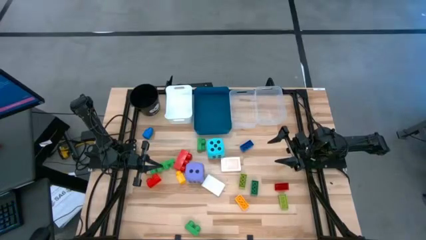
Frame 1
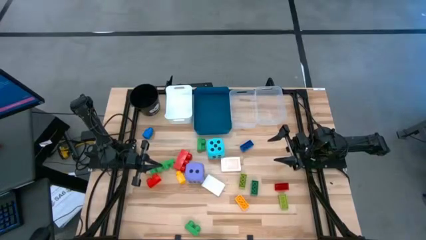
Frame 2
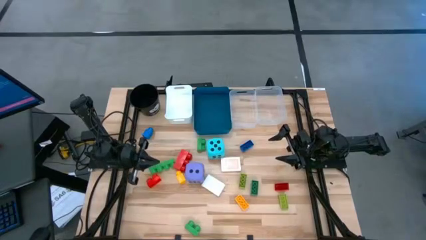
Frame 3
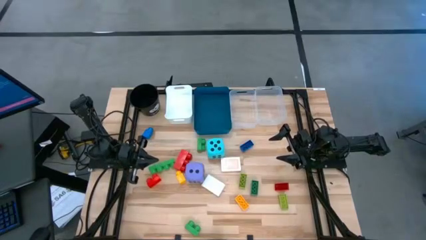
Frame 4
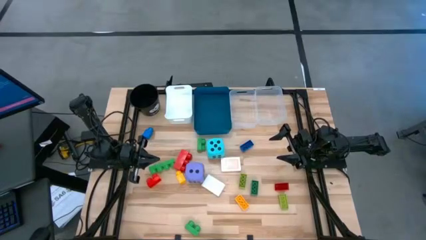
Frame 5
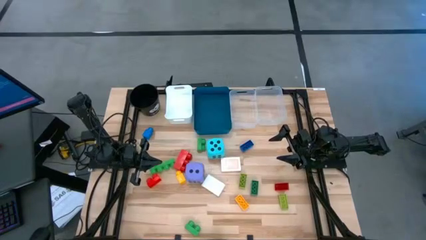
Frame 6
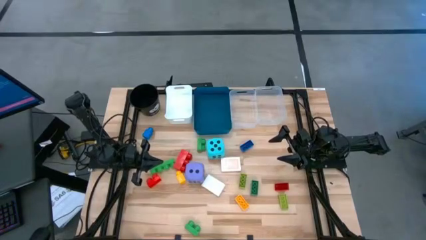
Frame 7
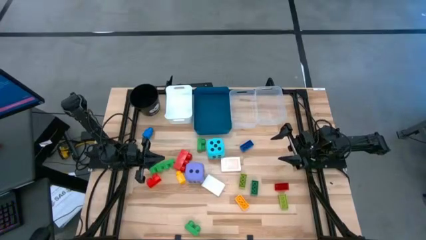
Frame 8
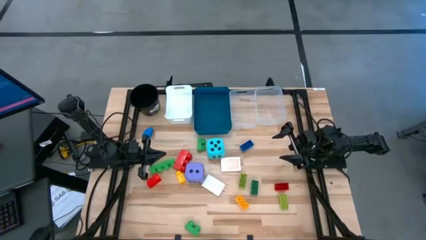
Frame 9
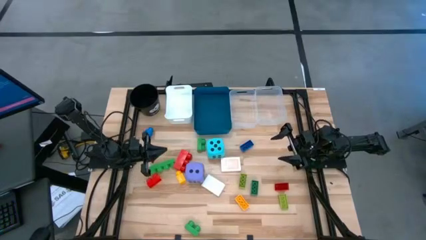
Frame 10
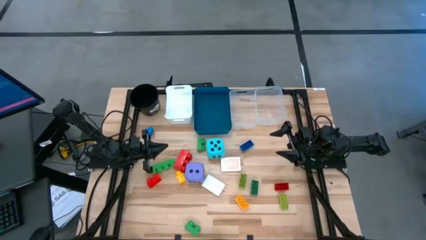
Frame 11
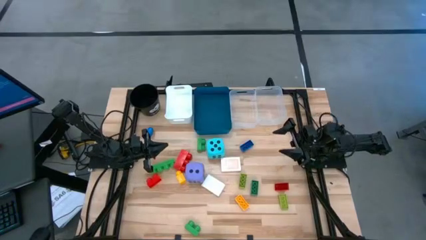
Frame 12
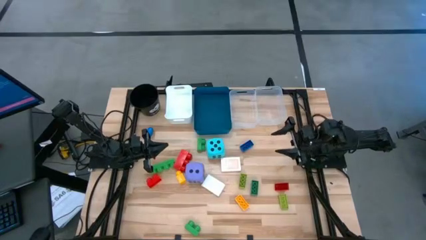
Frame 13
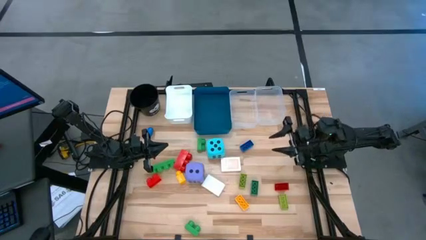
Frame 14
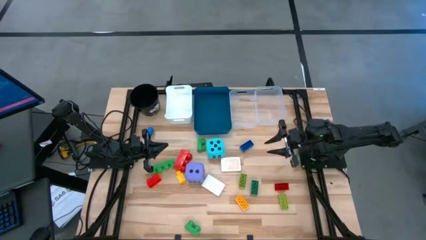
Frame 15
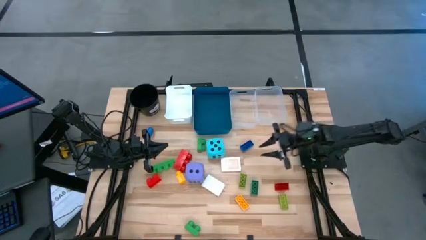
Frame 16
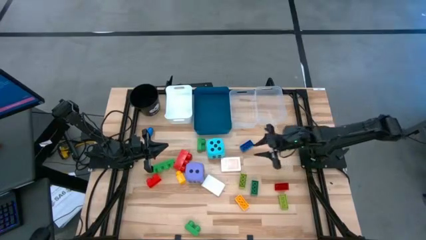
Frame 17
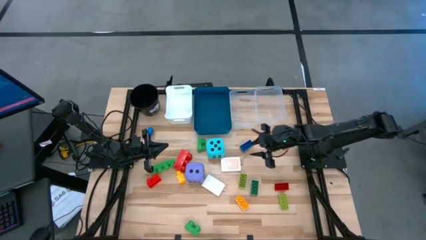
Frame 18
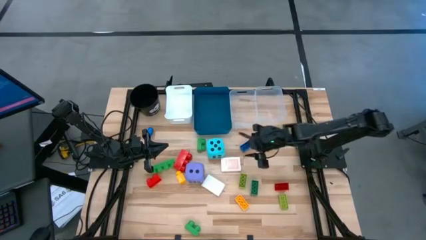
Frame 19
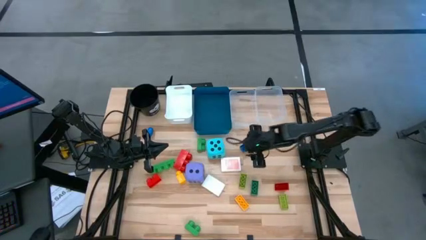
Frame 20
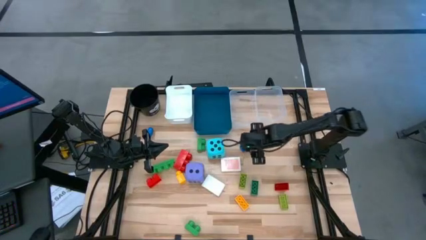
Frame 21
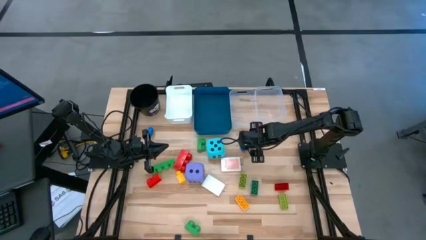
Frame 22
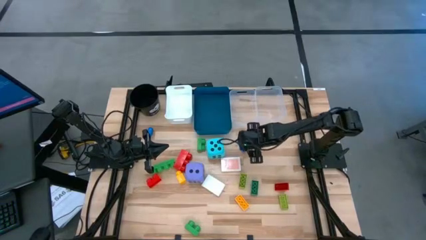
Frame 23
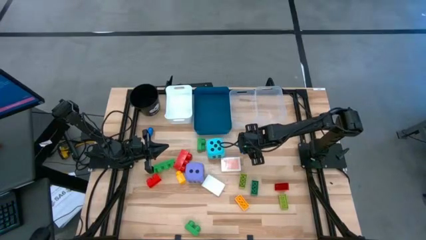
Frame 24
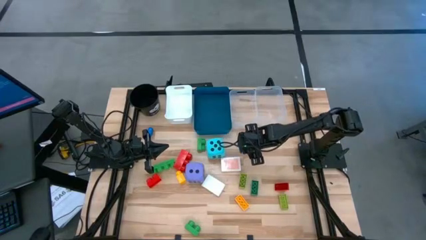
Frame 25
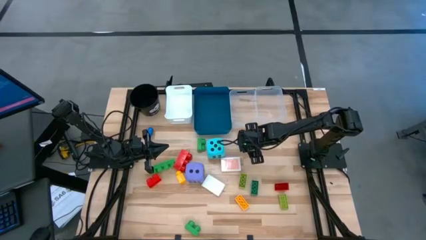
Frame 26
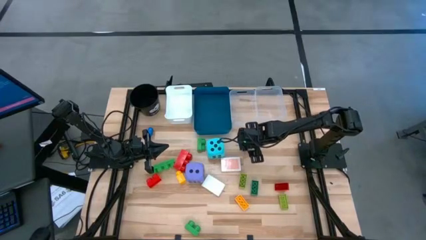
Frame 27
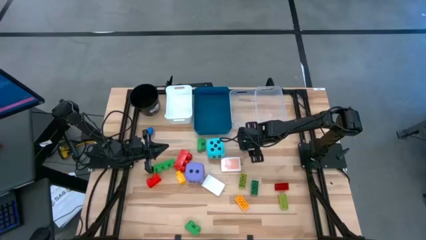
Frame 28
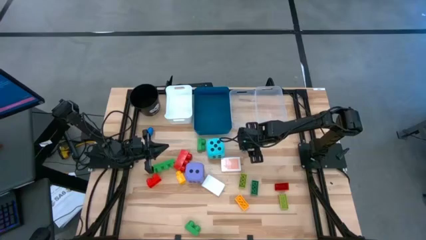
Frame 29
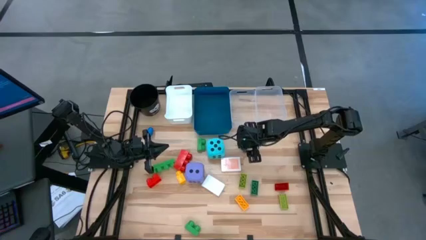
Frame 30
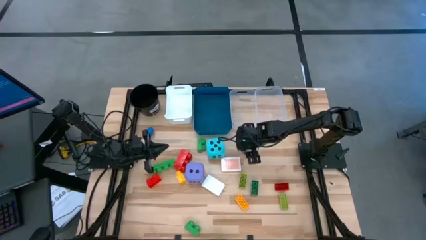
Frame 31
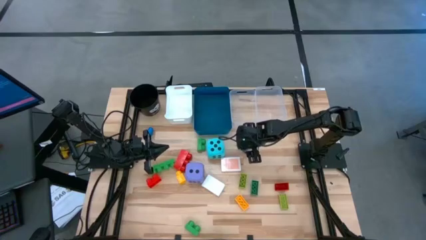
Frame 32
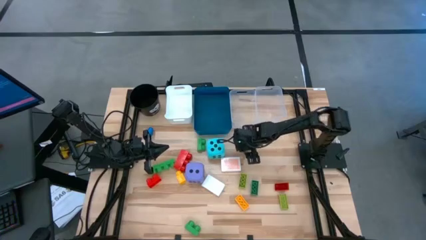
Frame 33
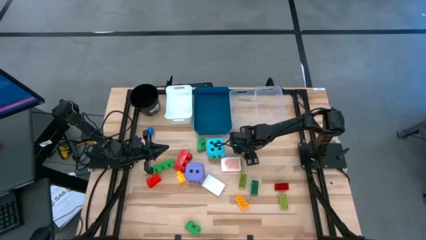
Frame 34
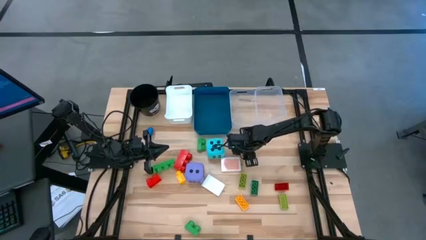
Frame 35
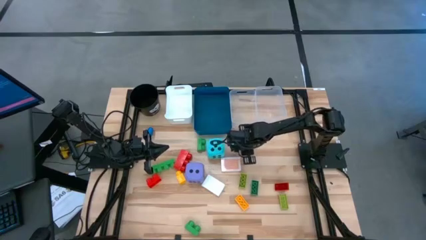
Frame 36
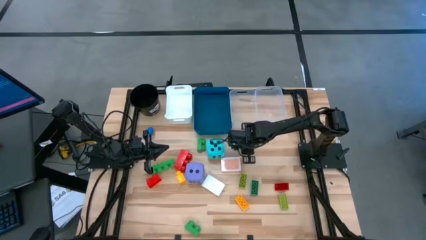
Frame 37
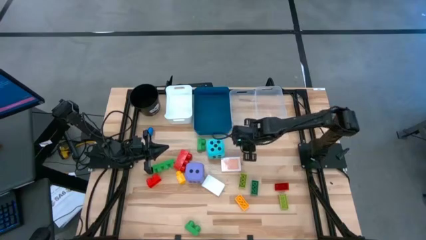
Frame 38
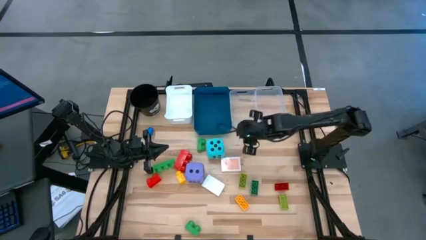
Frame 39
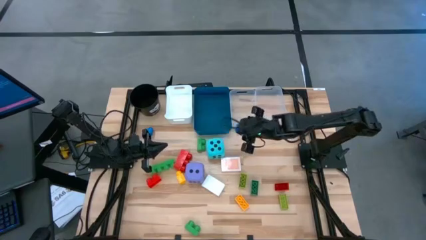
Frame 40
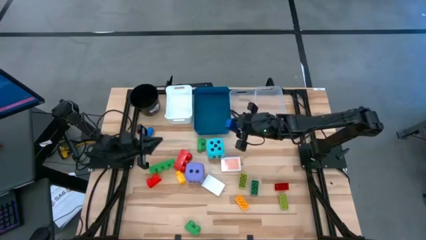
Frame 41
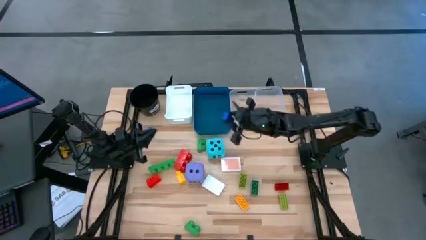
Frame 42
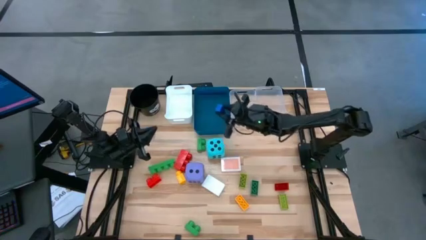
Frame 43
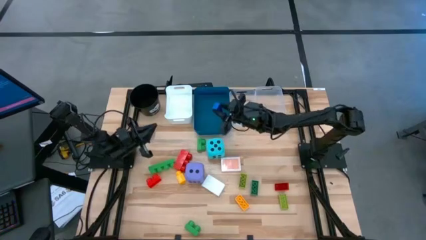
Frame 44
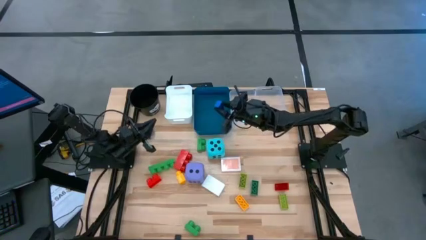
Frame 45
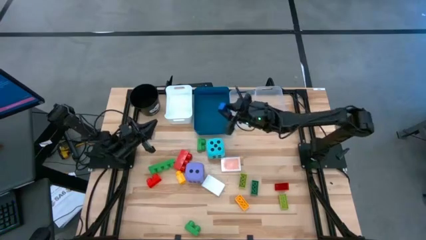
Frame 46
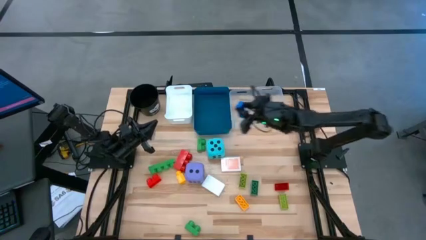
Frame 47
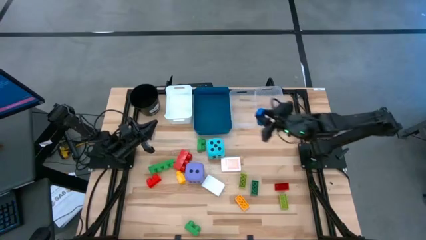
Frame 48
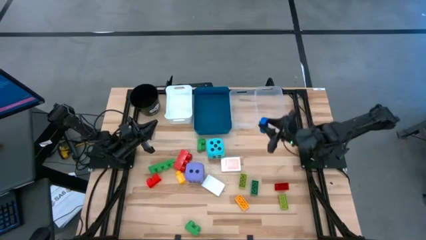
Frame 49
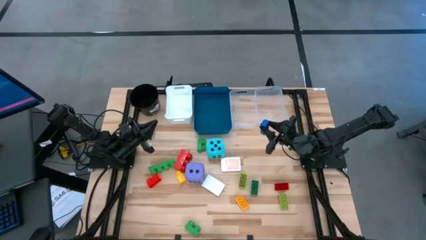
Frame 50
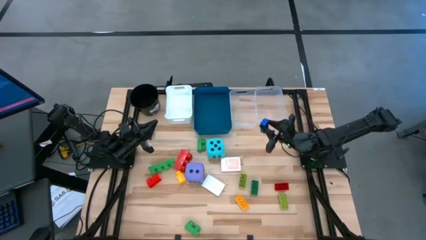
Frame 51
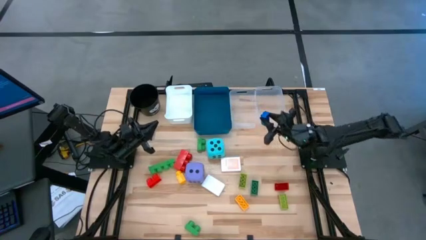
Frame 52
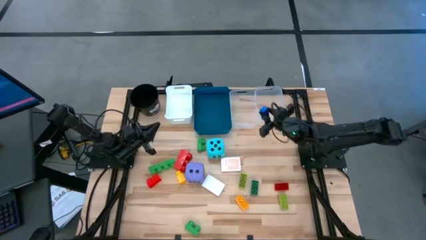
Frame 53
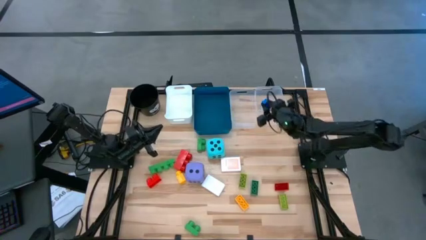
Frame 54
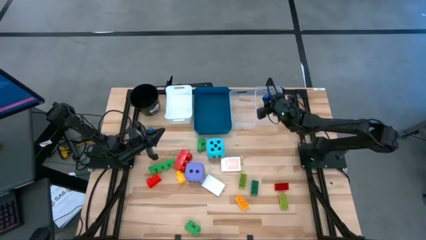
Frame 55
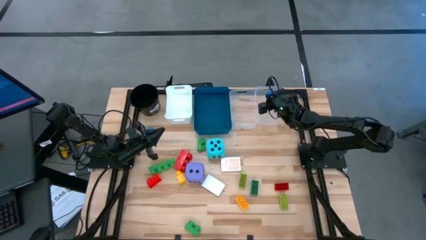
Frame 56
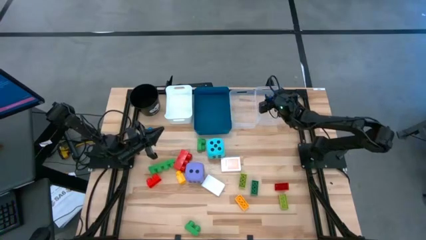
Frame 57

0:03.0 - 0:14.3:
Task: Pick & Place Toys
Put the small blue game piece into the right transparent bin
